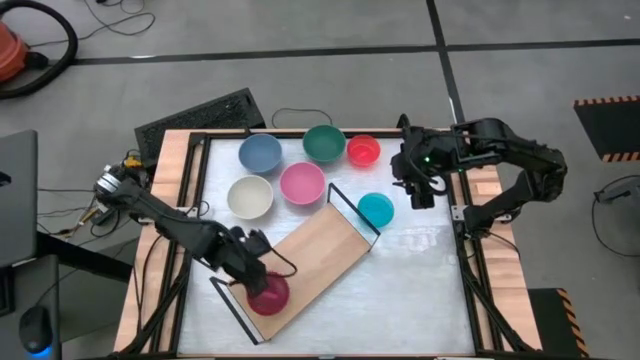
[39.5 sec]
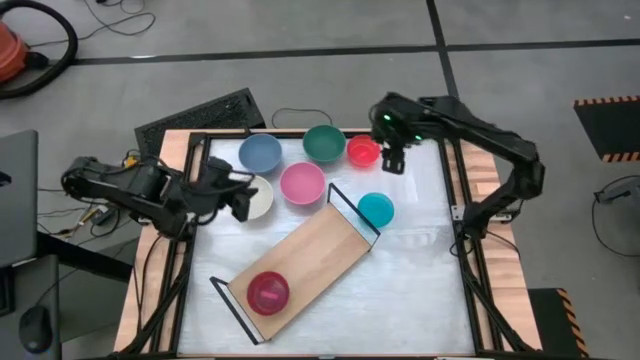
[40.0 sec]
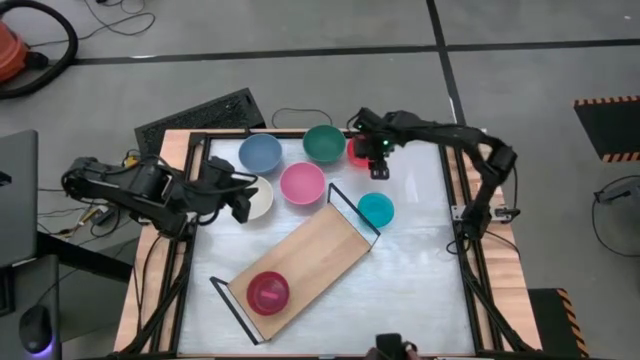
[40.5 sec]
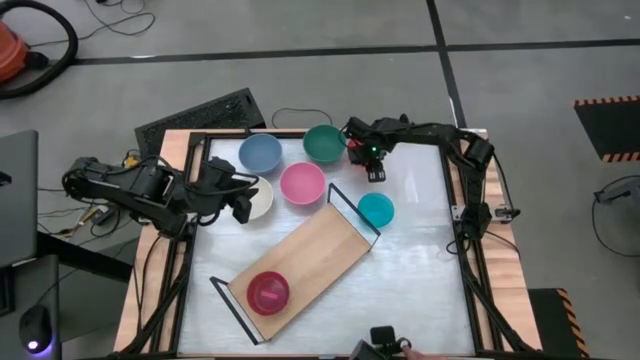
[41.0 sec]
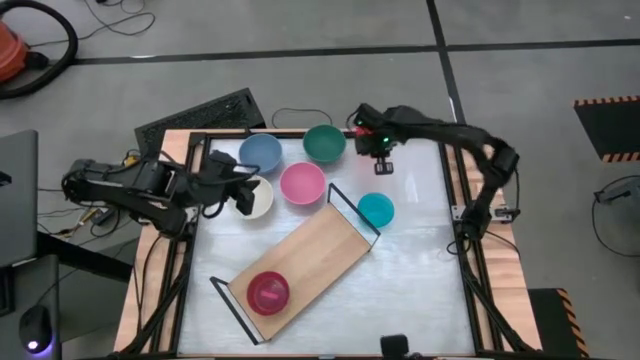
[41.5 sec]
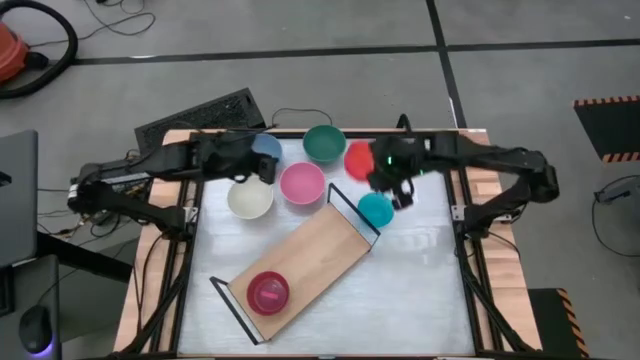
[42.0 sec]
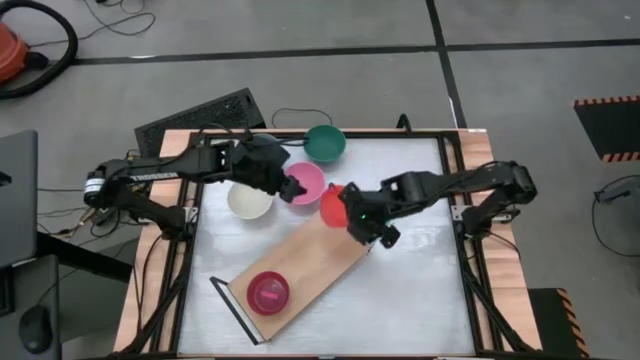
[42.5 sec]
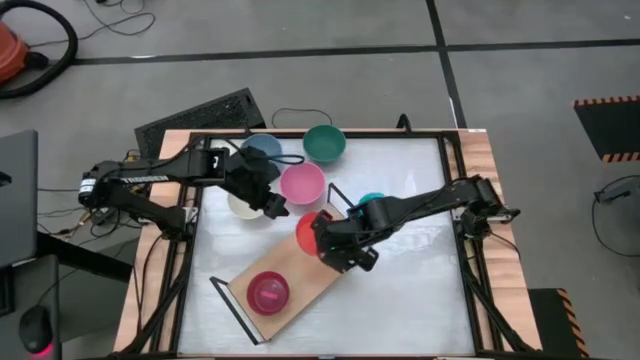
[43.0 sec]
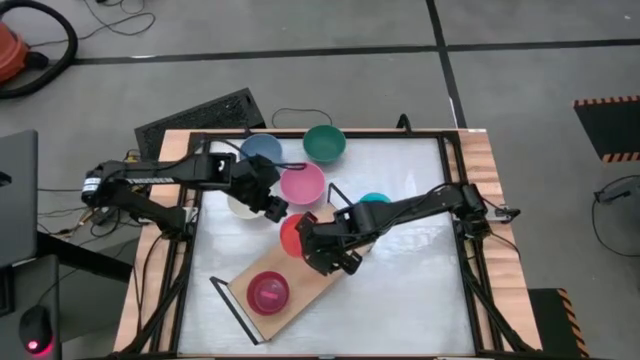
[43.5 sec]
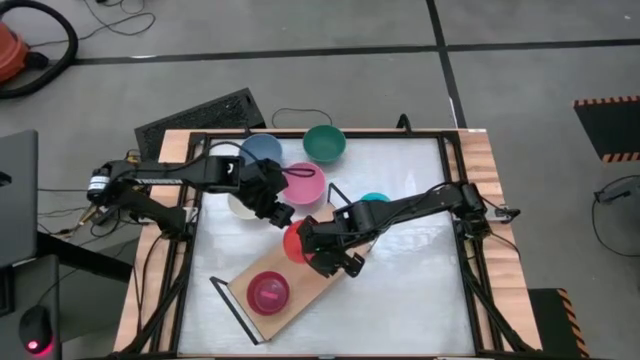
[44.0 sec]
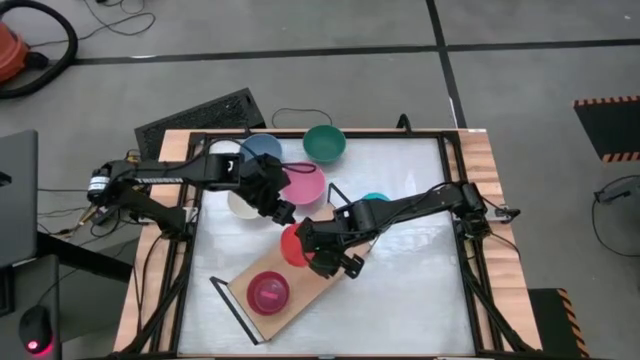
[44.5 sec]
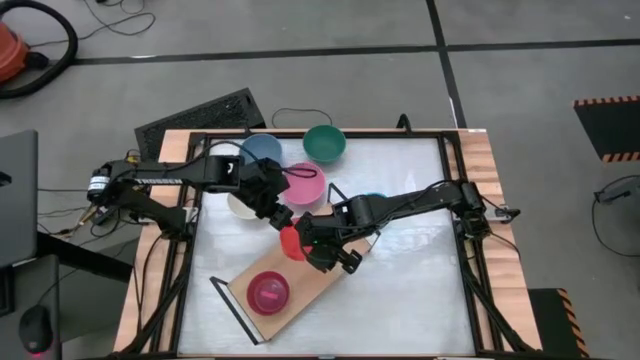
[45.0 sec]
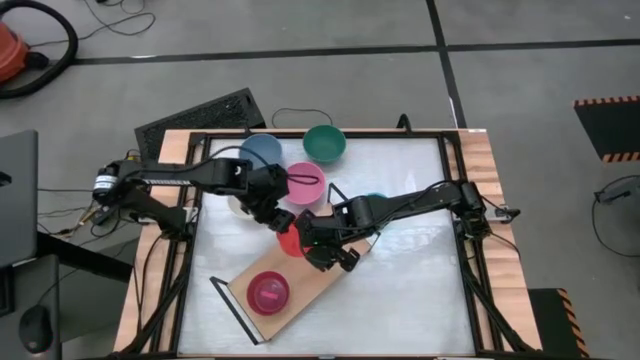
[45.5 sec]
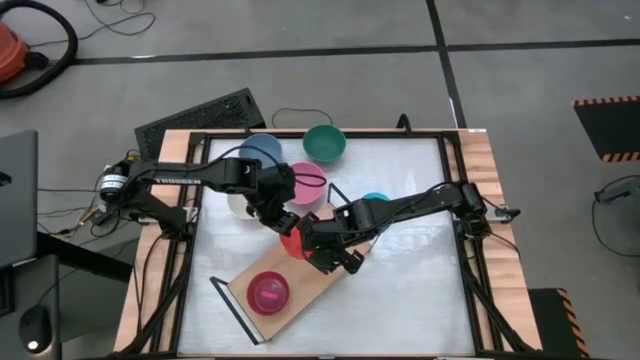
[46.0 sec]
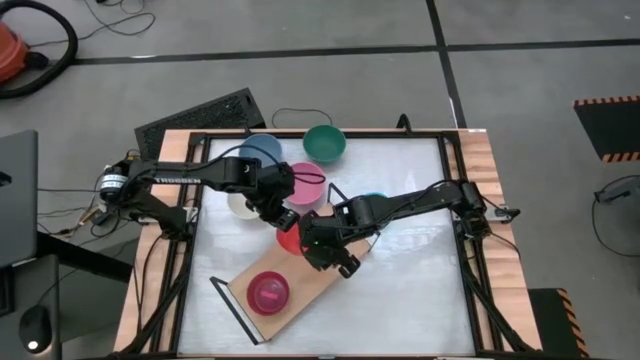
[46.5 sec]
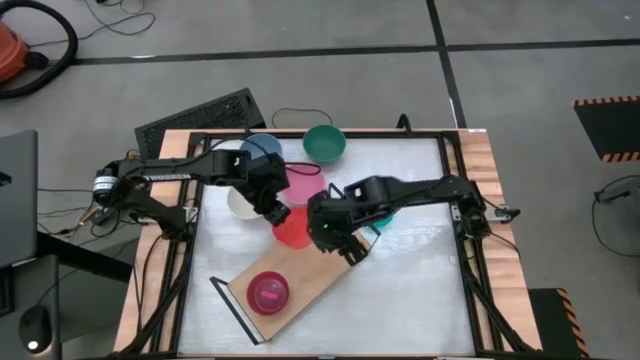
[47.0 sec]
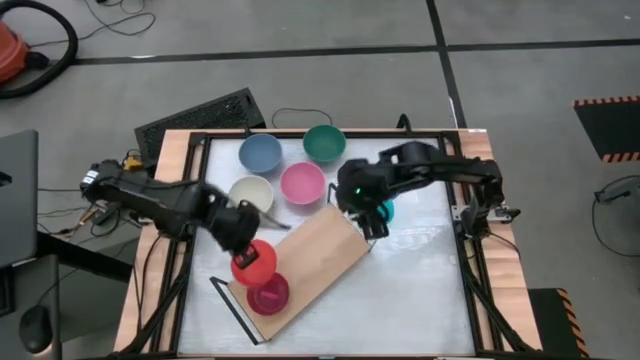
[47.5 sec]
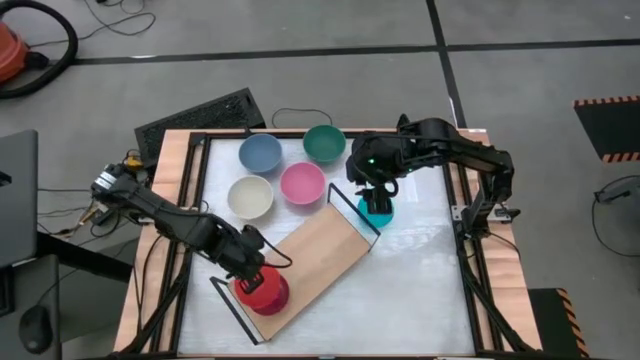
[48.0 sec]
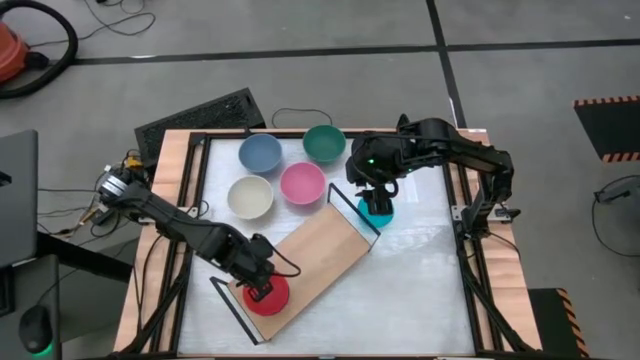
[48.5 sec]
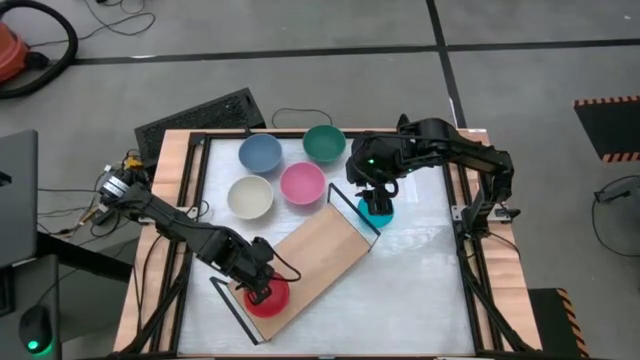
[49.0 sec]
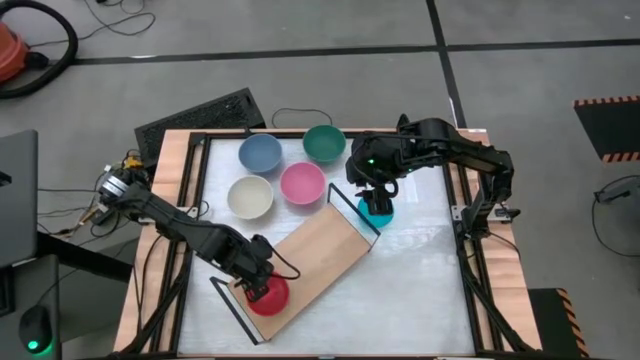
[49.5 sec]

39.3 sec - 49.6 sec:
Task: Place and stack bowls onto a shelf
Stack the transparent orange bowl on the top transparent pink bowl on the shelf

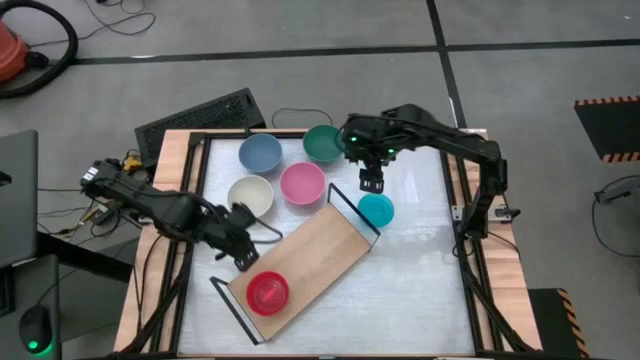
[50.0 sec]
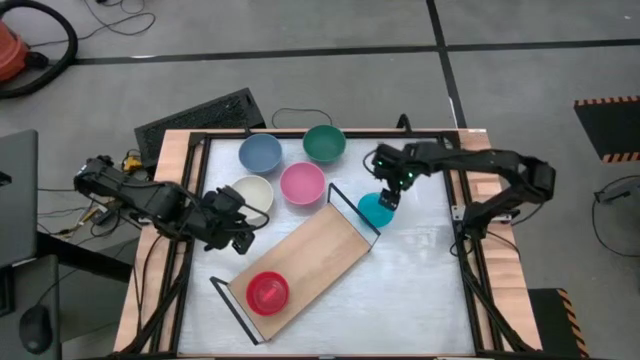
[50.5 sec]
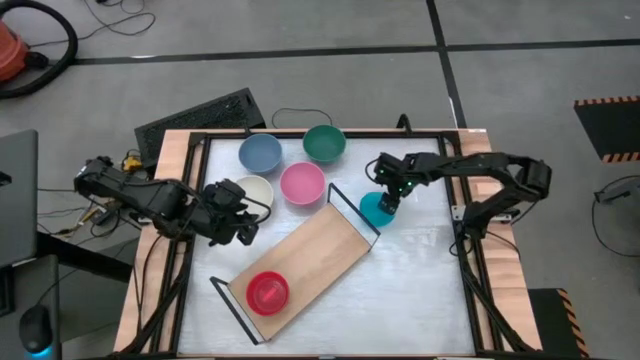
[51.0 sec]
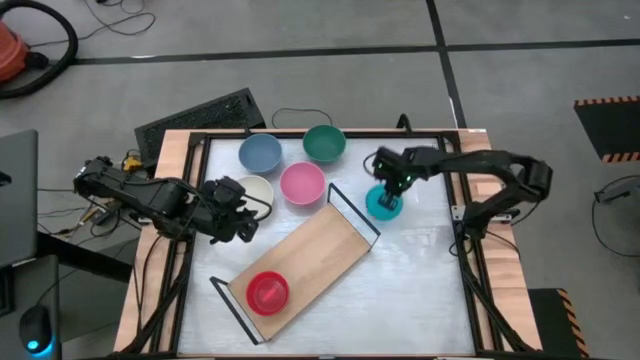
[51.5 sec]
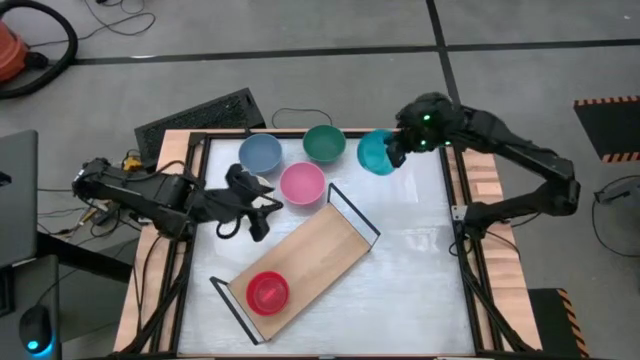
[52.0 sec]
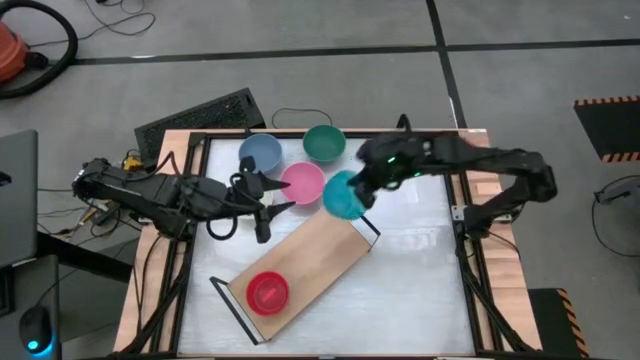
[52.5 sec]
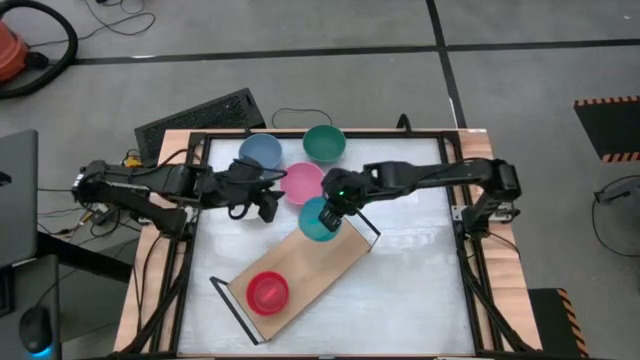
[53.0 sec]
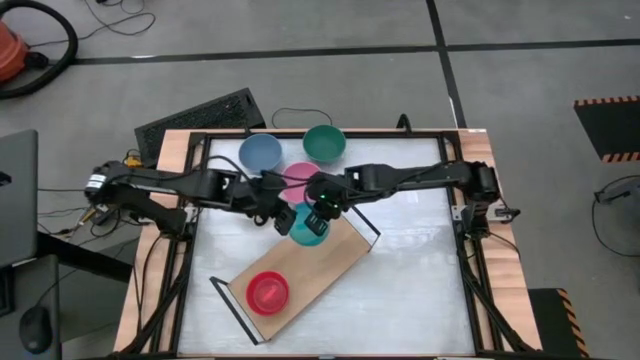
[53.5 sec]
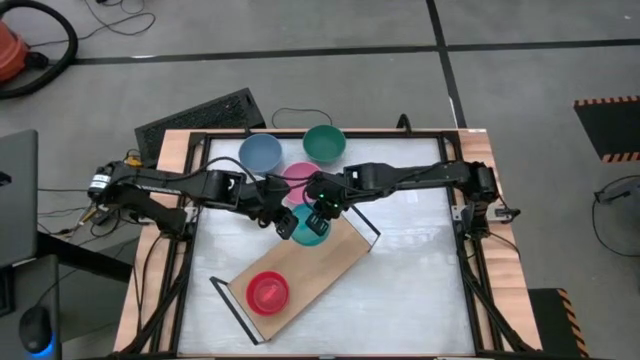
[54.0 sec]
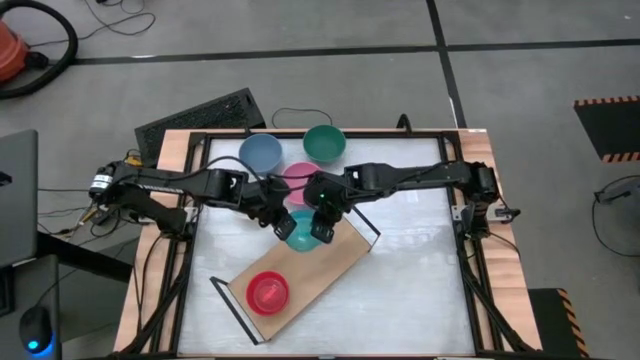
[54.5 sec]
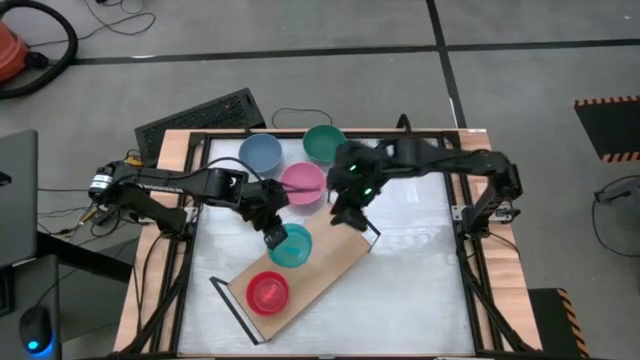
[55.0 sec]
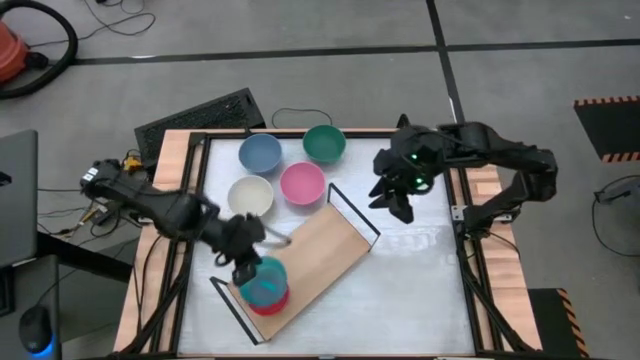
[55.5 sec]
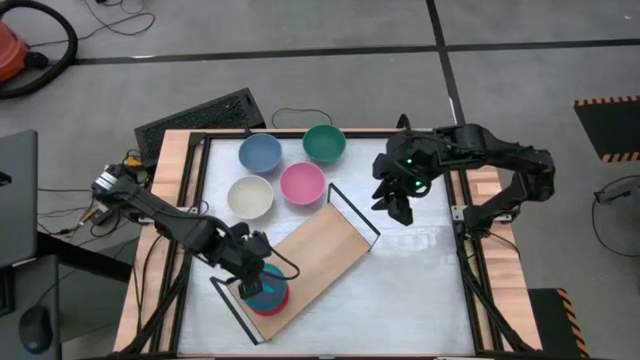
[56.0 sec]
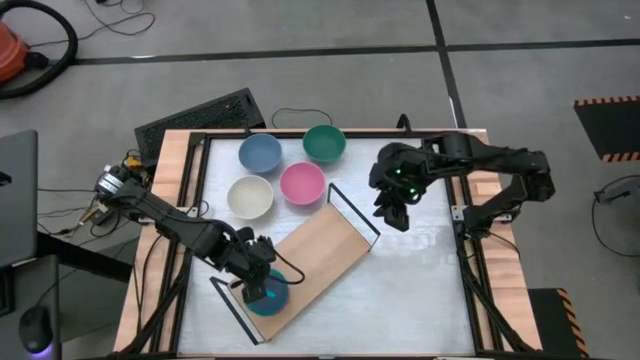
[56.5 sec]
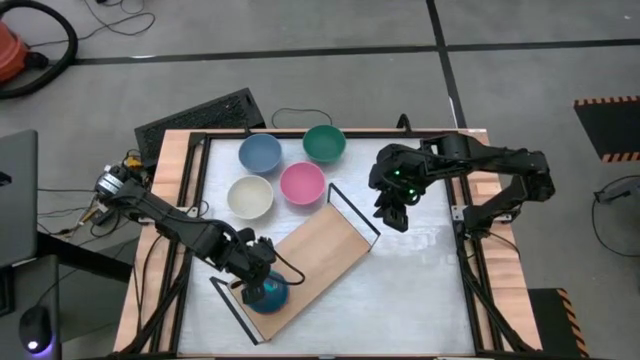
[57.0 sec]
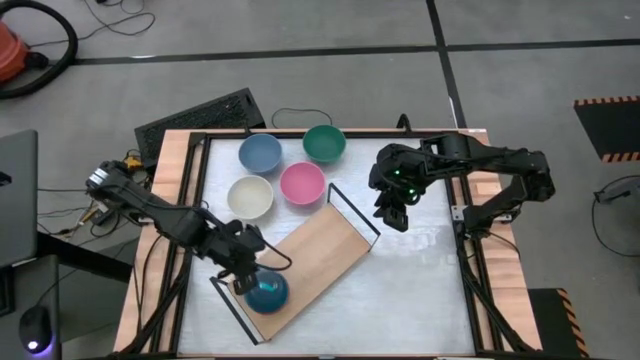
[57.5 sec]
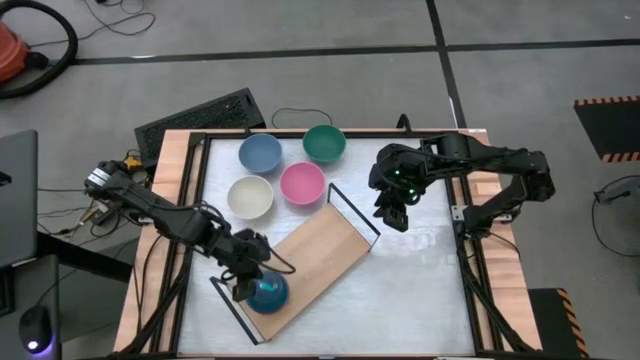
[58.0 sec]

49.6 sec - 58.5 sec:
Stack the transparent blue bowl on the top transparent orange bowl

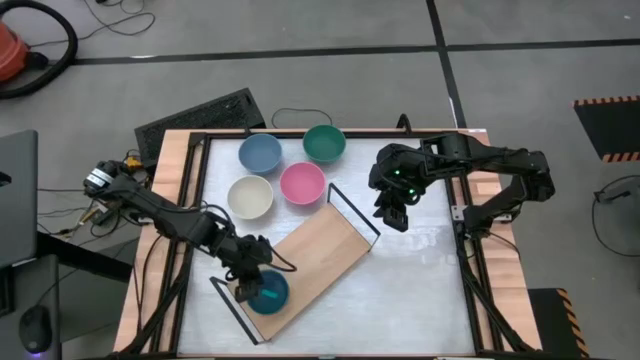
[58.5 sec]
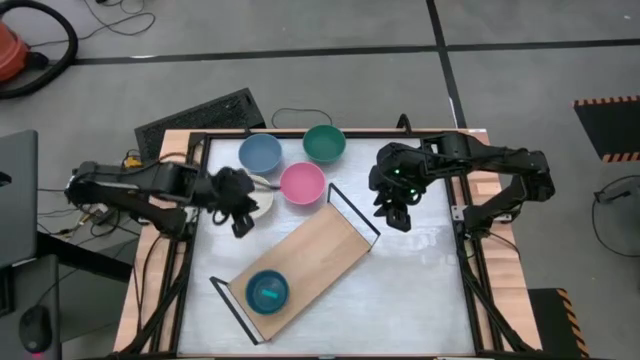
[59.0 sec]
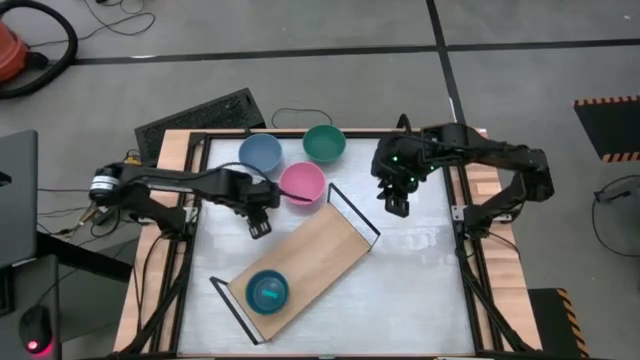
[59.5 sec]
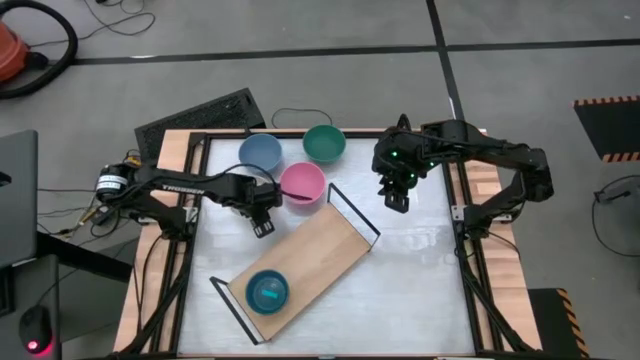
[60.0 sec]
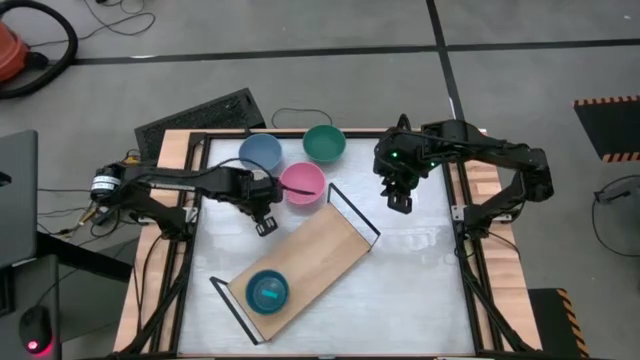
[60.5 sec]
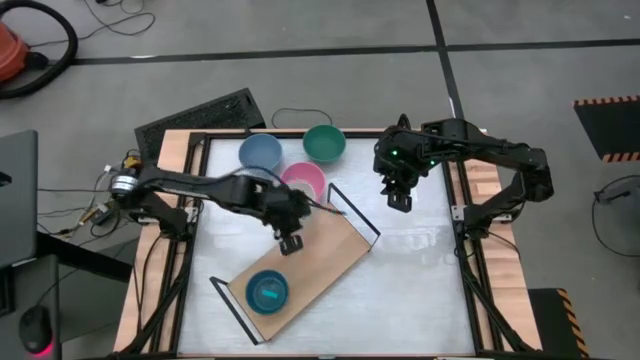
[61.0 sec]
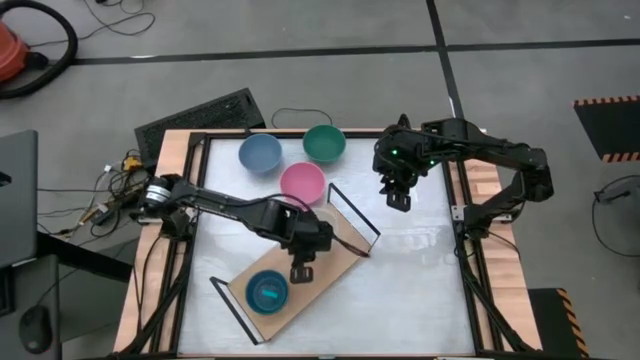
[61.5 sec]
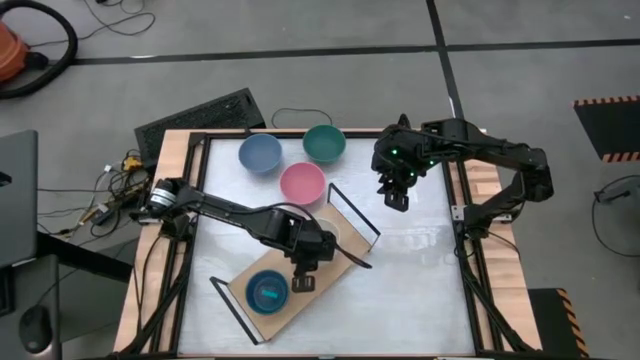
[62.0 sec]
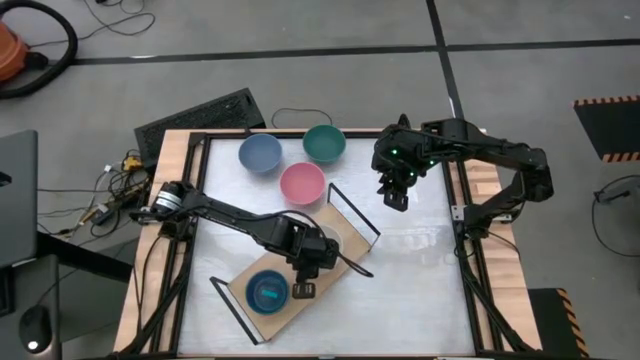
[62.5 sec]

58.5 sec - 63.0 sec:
Put the white bowl on the shelf
